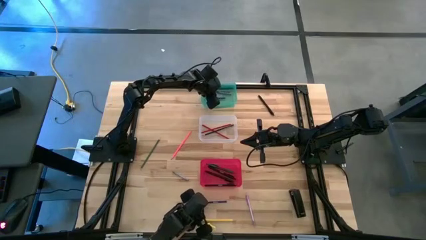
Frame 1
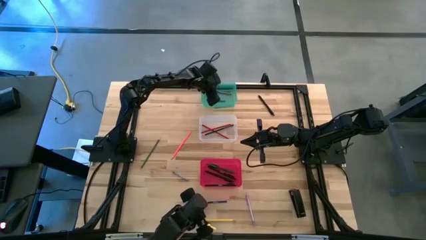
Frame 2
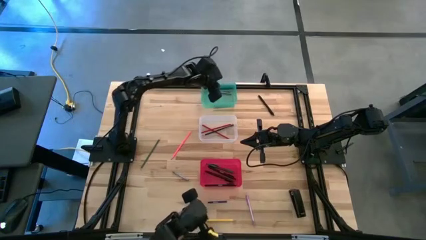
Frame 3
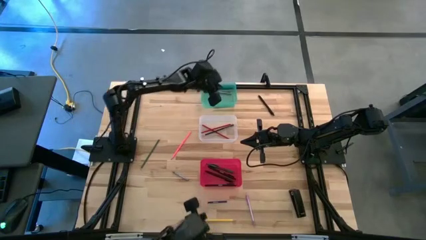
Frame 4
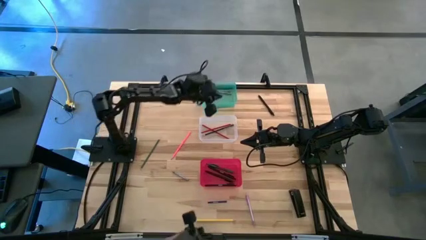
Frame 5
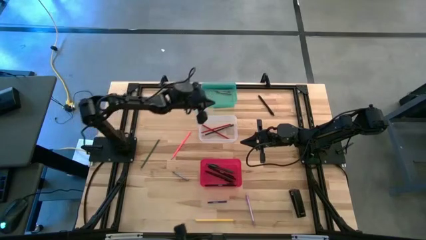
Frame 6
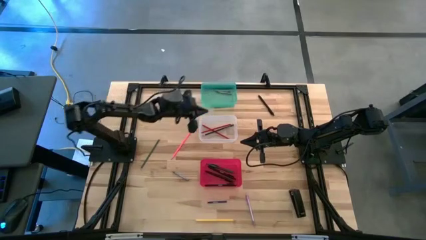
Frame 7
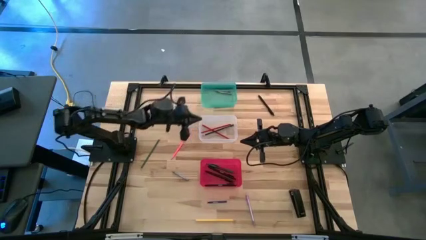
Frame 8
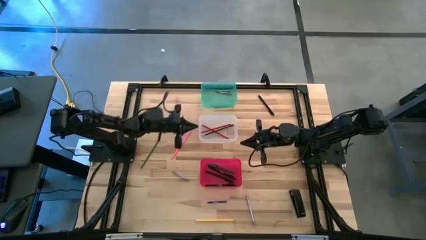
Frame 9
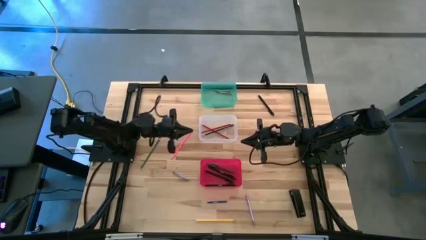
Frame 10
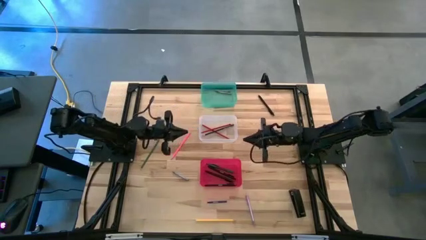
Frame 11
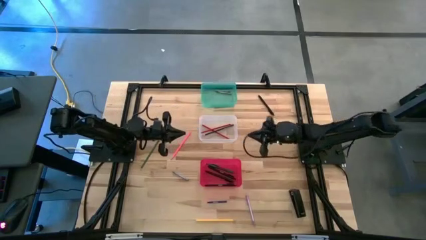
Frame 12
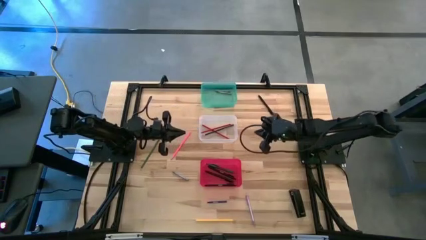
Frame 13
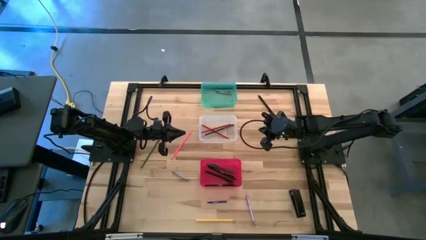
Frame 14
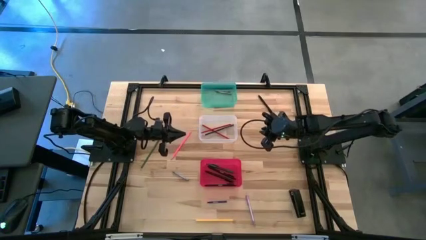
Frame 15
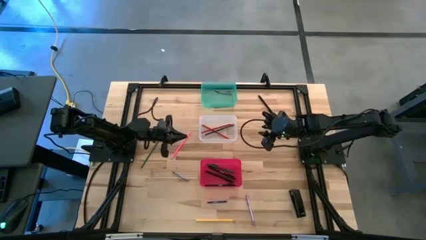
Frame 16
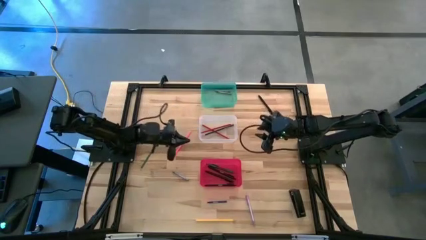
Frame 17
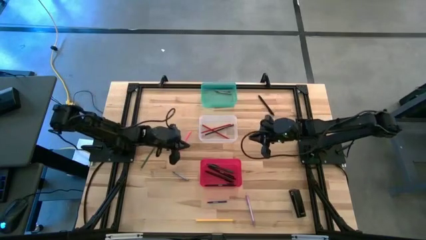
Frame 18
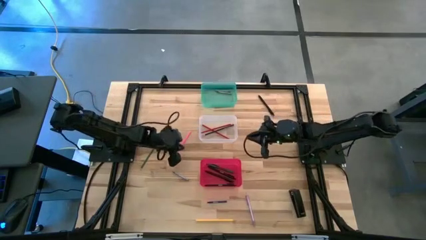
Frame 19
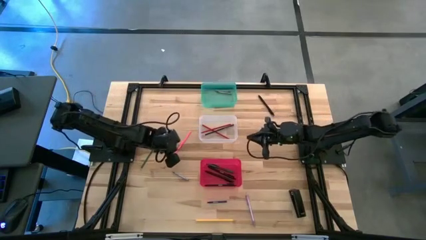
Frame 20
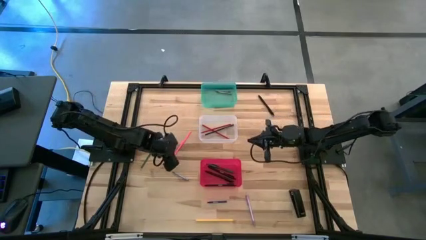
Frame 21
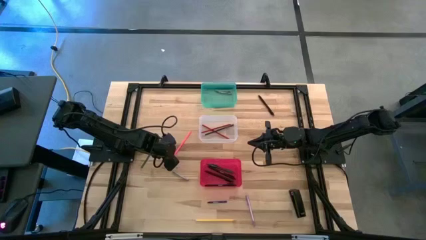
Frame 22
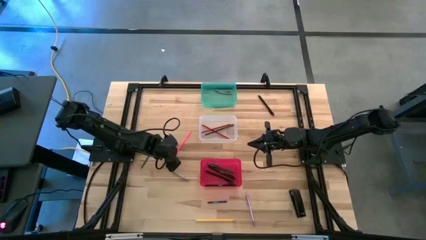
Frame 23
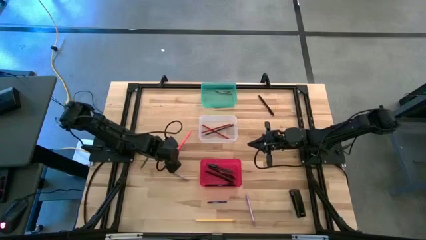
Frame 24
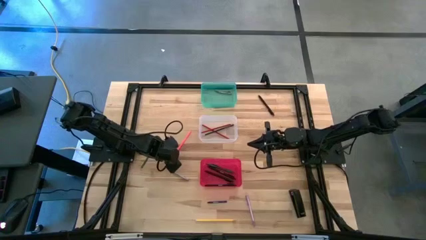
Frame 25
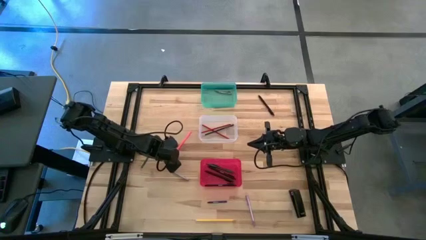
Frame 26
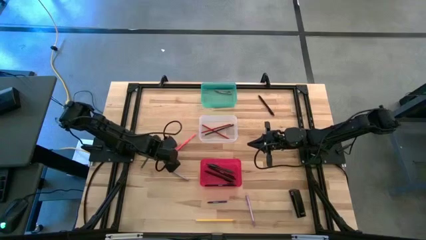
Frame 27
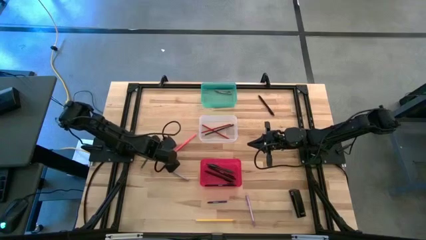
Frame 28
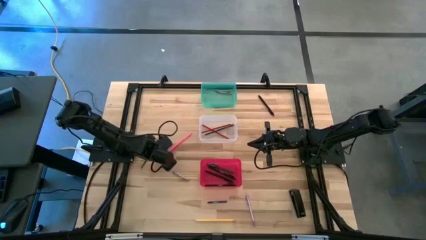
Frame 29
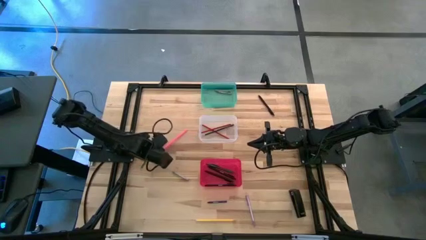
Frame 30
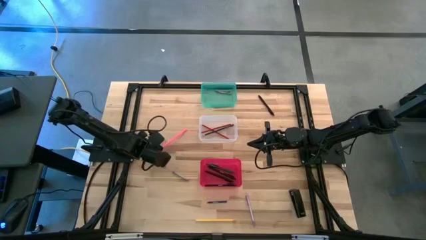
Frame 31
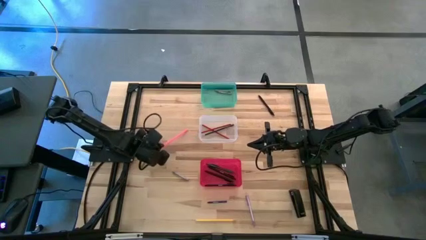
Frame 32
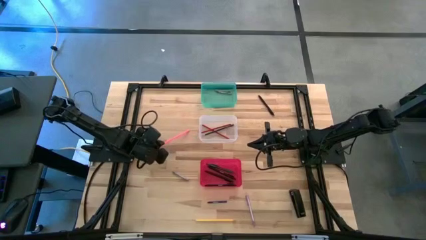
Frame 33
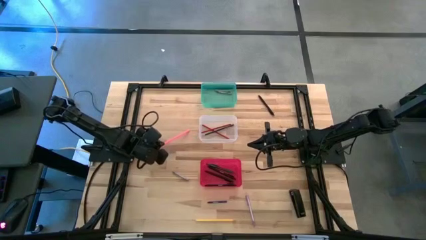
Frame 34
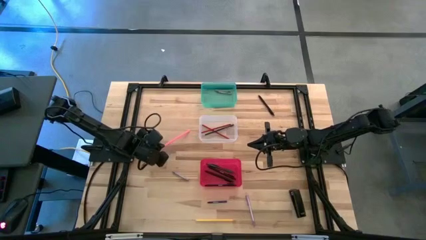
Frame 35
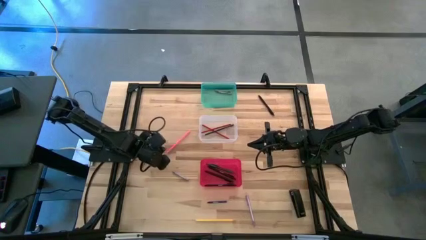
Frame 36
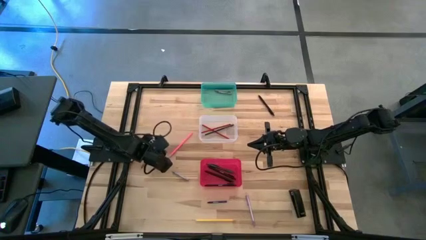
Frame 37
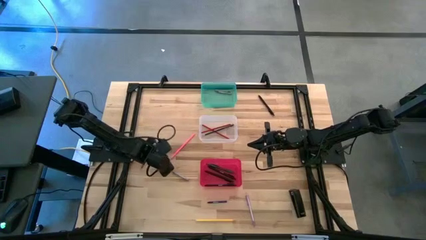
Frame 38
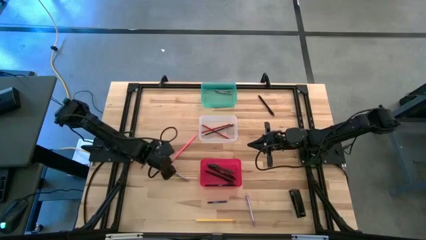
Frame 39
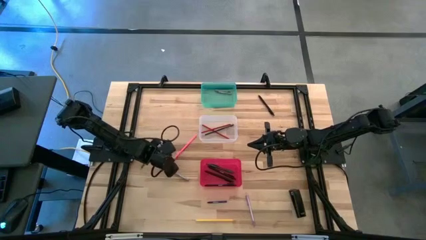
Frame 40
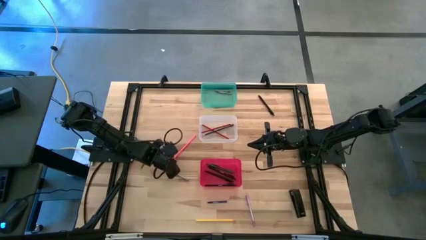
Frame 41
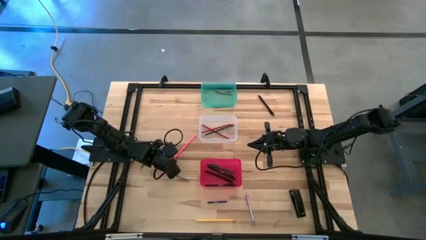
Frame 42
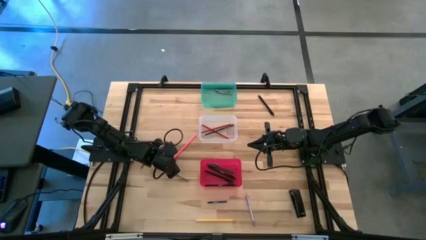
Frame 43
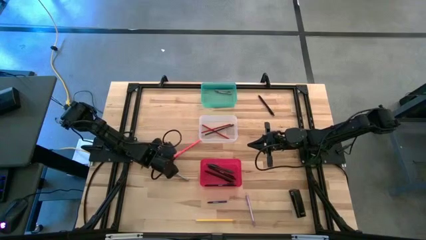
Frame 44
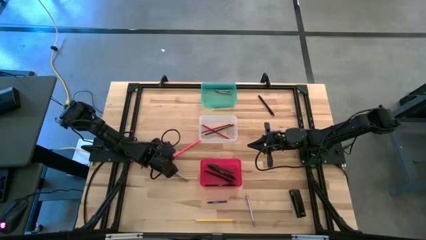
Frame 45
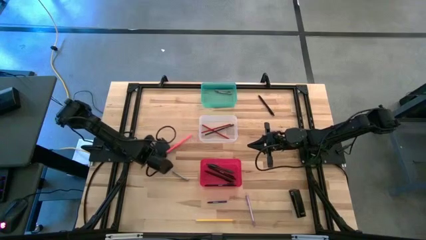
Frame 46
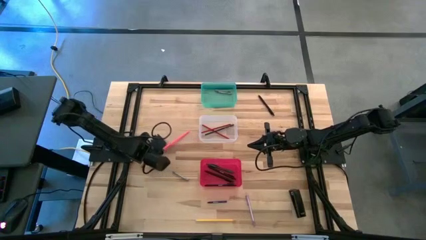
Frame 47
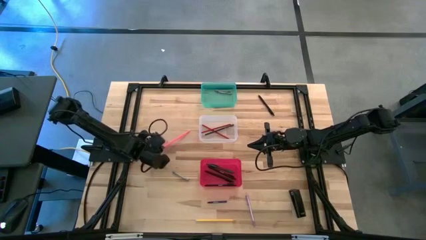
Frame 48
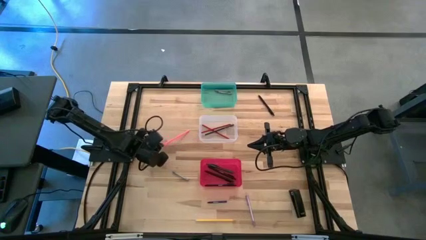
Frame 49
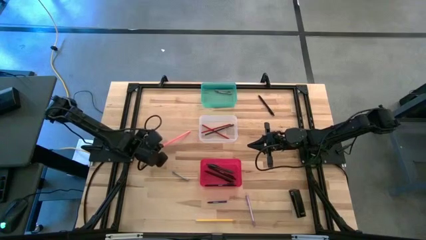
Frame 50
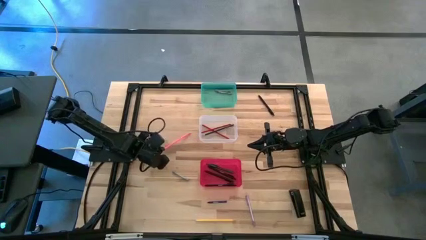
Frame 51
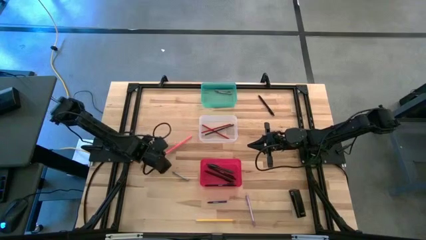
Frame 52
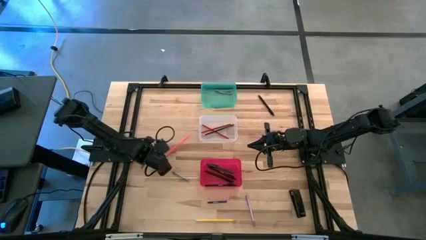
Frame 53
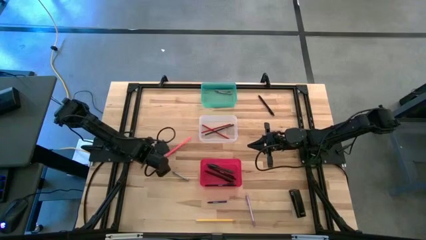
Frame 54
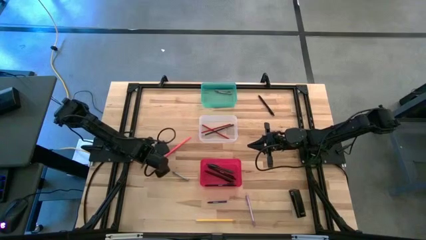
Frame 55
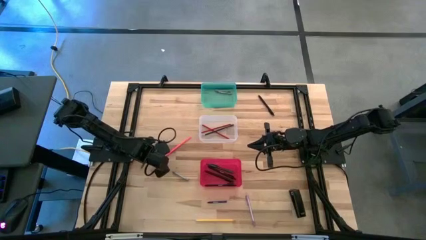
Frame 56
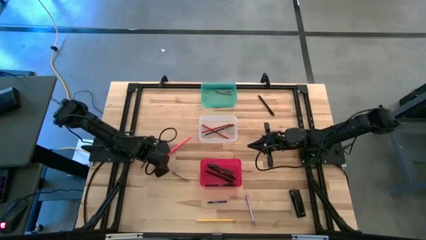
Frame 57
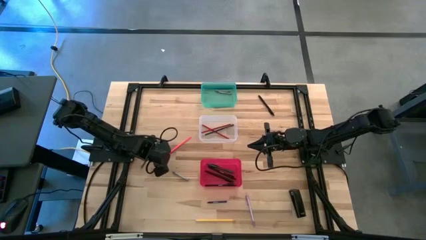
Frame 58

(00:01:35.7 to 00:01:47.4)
Task: Sort crayons/erasers/pens/pencils in bins
Put the pink pencil into the transparent bin

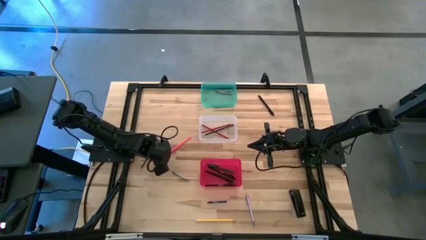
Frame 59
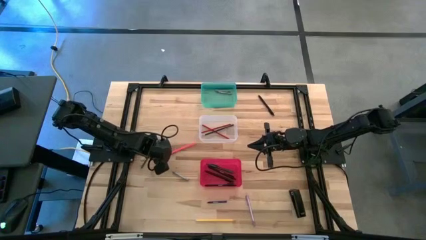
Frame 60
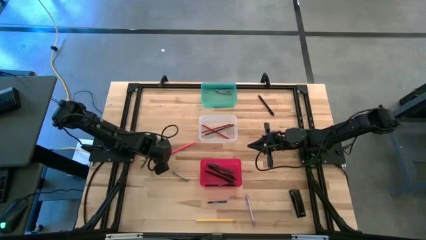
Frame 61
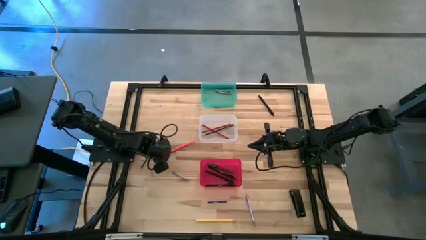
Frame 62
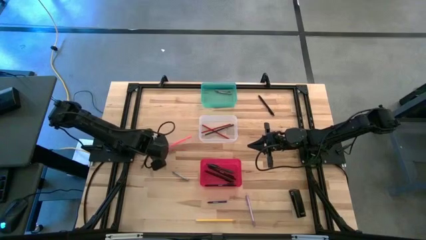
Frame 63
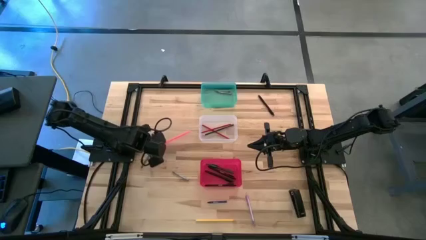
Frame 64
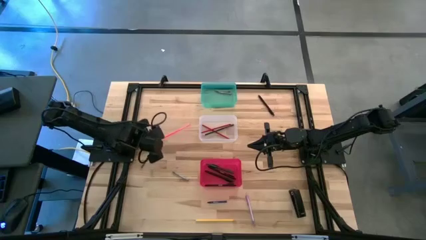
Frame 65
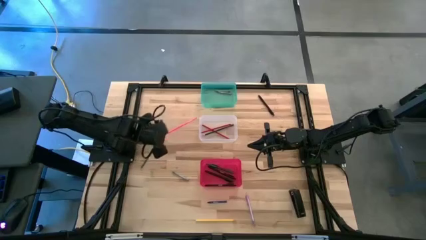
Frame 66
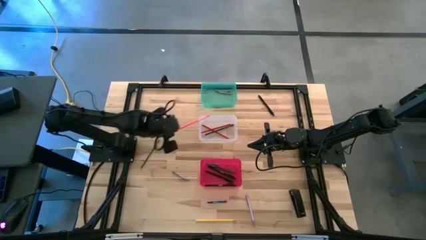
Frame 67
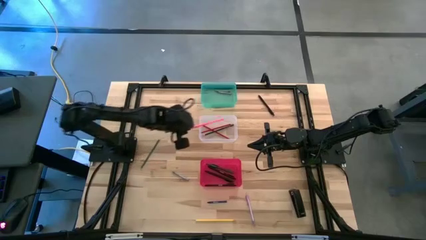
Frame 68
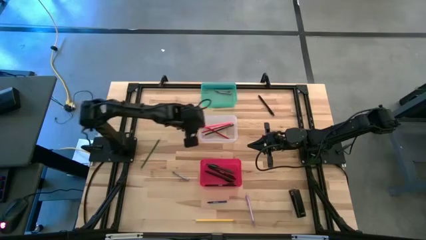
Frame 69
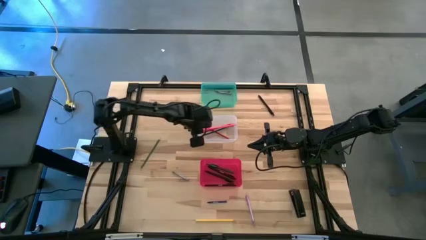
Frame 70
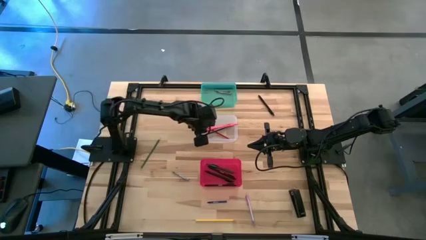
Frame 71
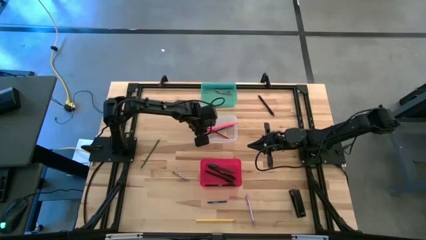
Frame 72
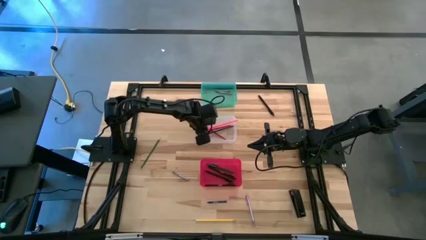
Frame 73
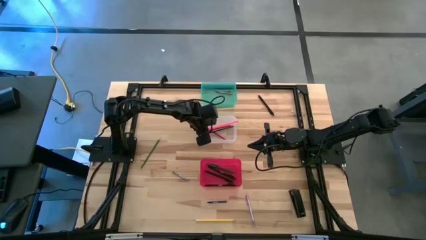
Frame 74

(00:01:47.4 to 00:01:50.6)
Put the pink pencil into the transparent bin

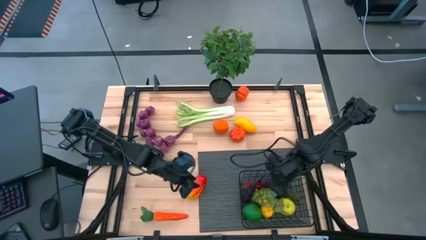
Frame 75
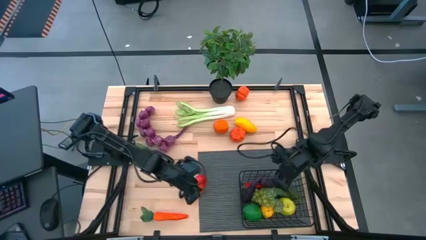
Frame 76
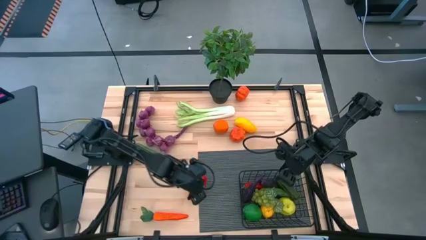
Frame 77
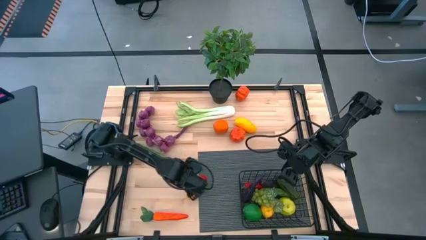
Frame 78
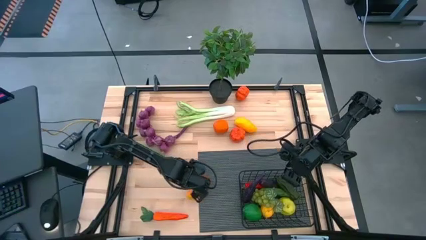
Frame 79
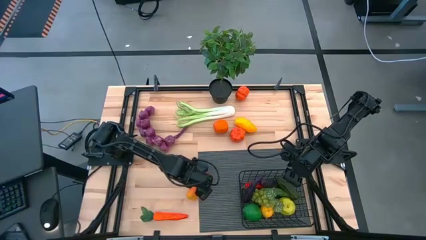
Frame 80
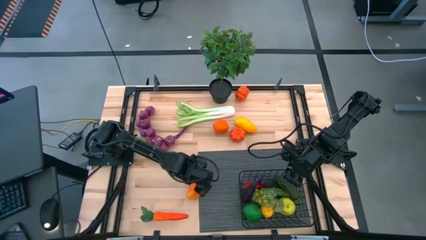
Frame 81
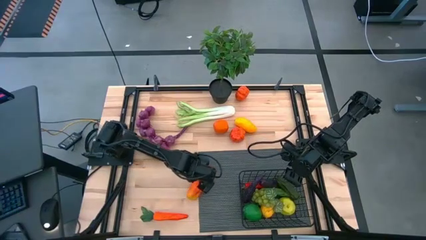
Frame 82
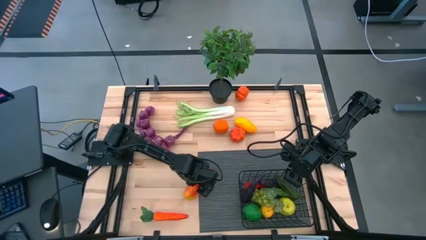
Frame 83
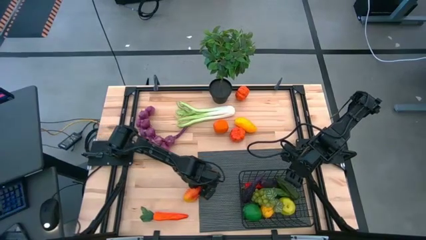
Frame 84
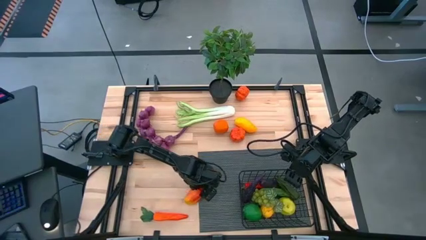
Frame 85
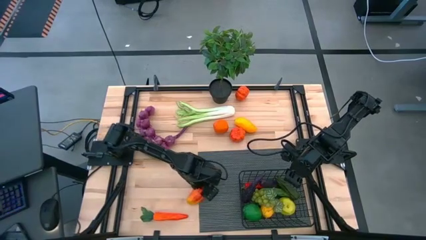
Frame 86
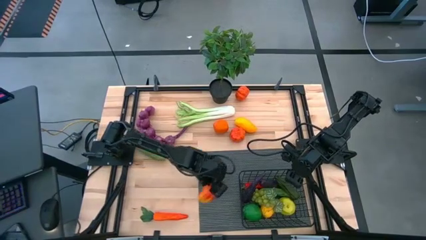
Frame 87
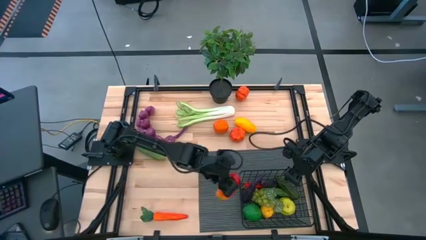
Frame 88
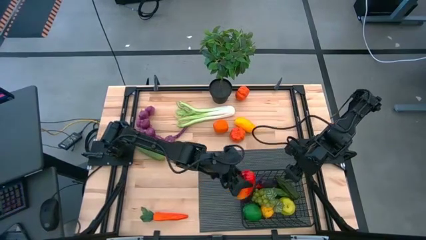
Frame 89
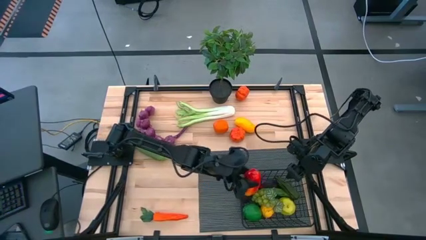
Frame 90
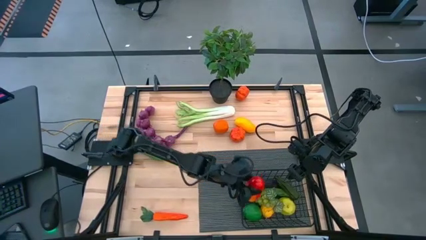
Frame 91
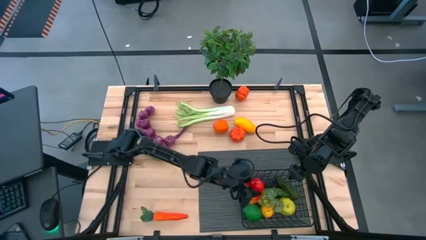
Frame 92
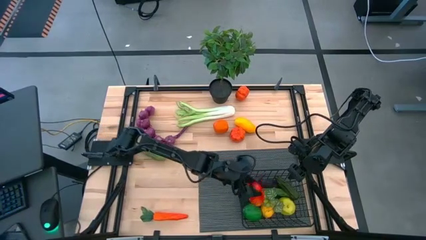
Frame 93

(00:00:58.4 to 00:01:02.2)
Task: Build produce basket
Put the orange mango into the black wire basket
